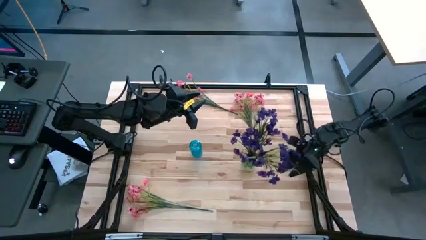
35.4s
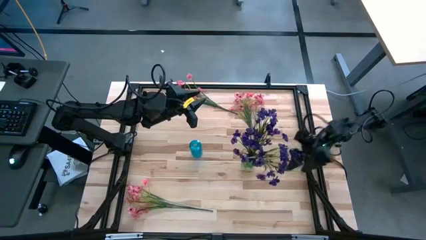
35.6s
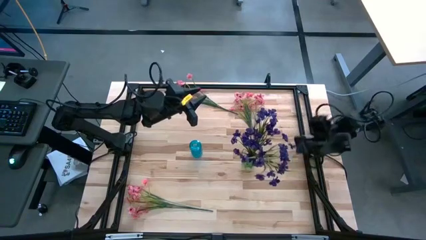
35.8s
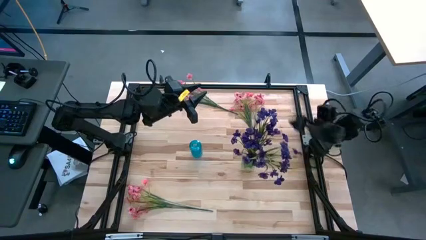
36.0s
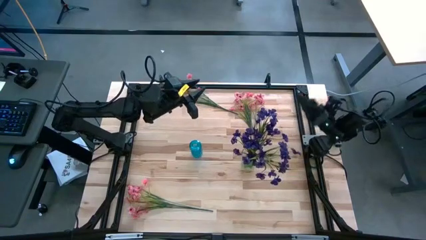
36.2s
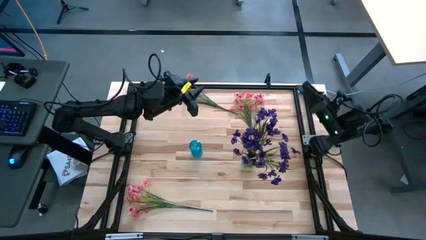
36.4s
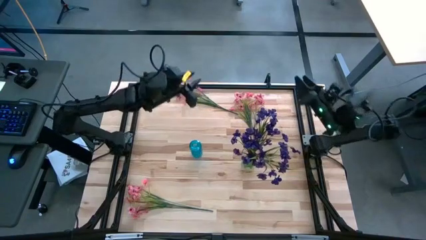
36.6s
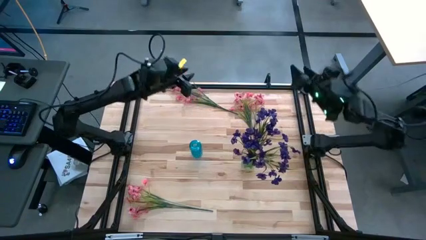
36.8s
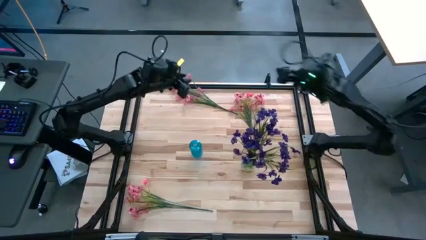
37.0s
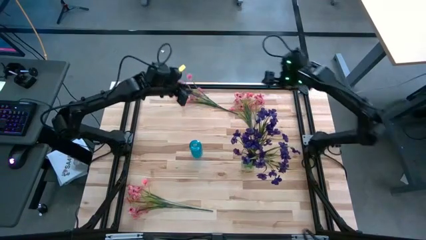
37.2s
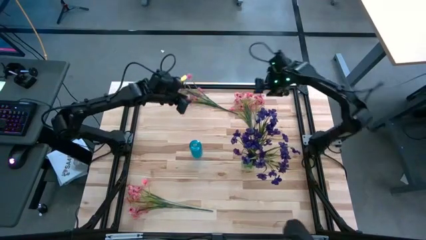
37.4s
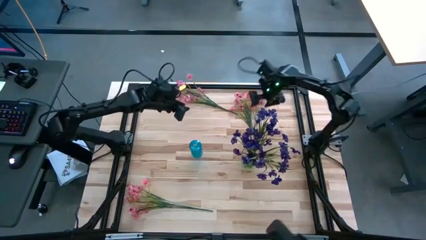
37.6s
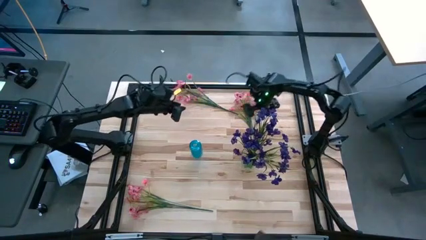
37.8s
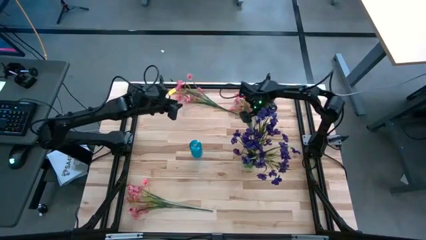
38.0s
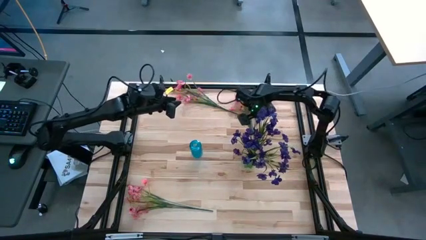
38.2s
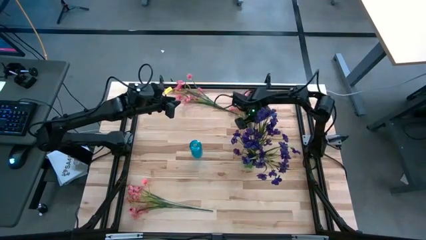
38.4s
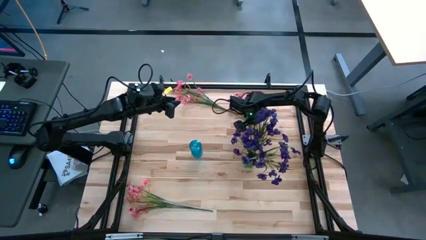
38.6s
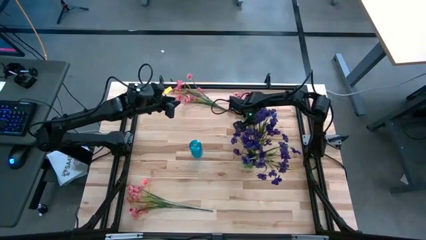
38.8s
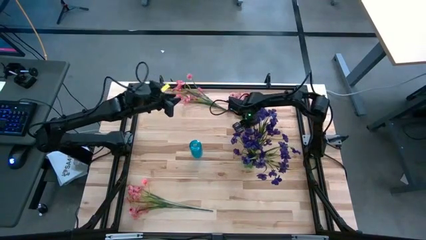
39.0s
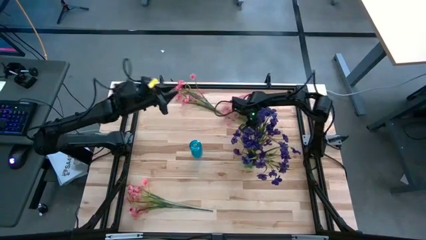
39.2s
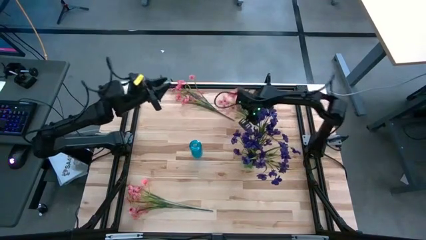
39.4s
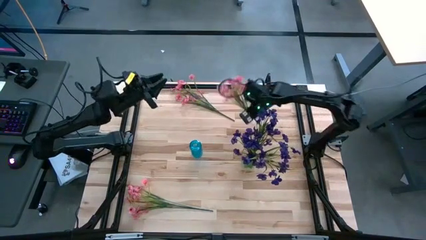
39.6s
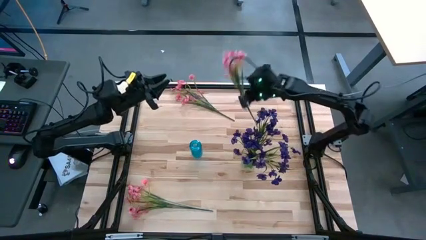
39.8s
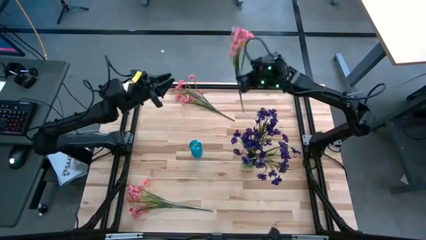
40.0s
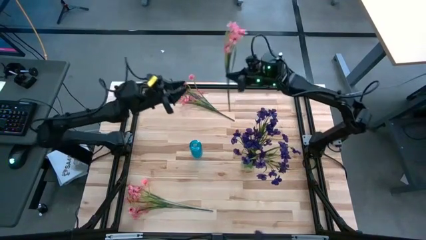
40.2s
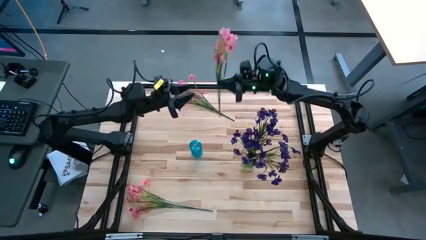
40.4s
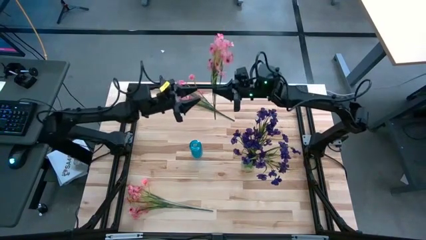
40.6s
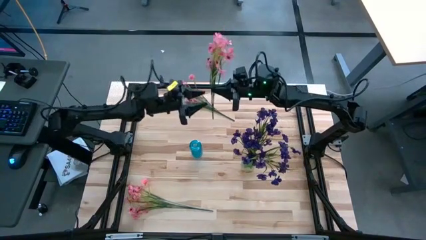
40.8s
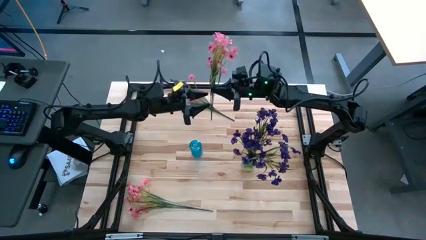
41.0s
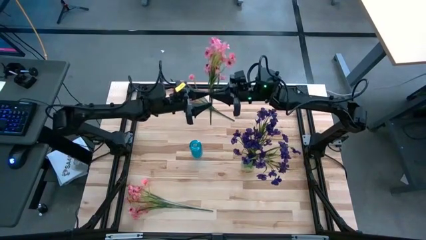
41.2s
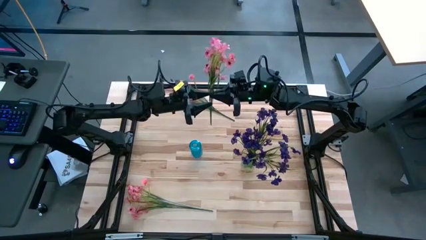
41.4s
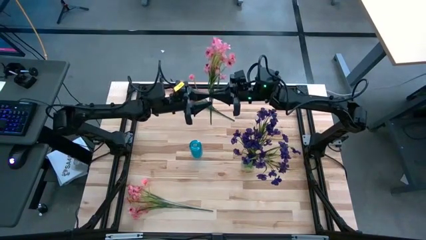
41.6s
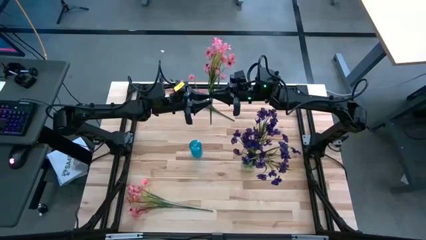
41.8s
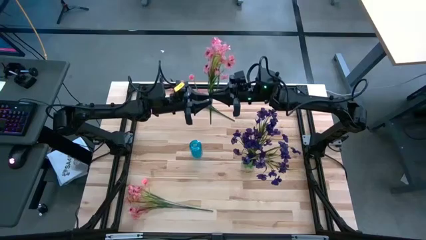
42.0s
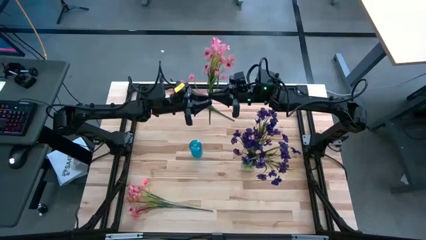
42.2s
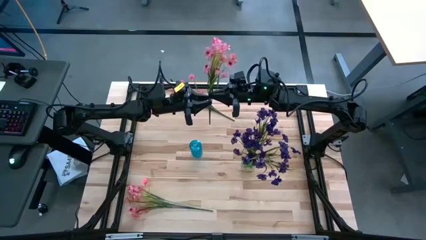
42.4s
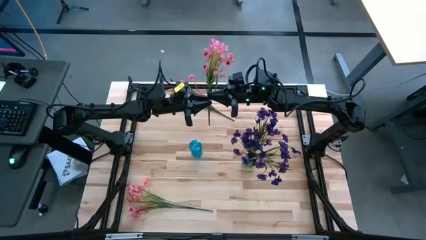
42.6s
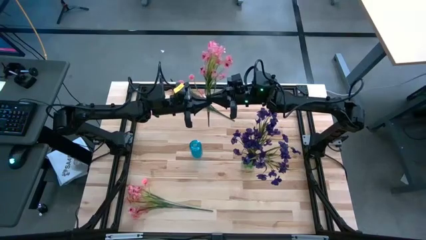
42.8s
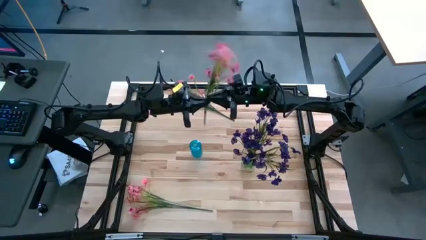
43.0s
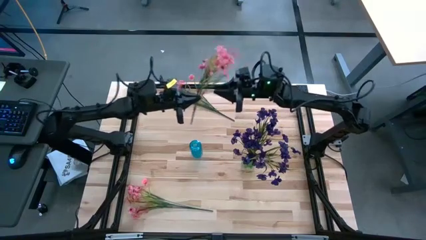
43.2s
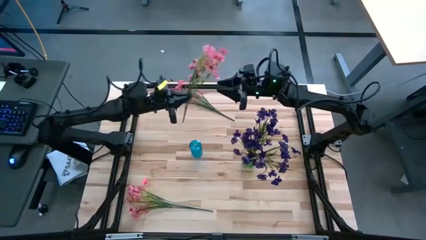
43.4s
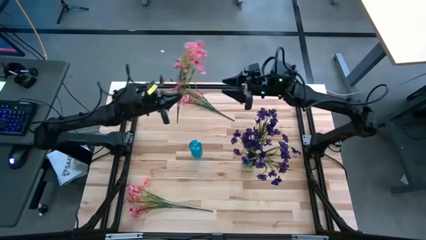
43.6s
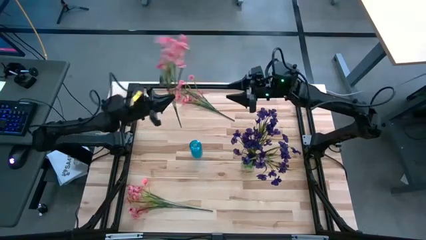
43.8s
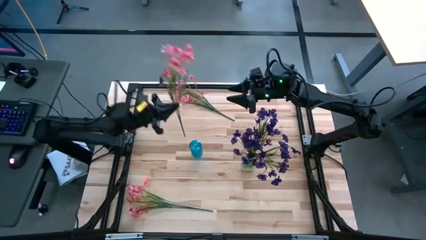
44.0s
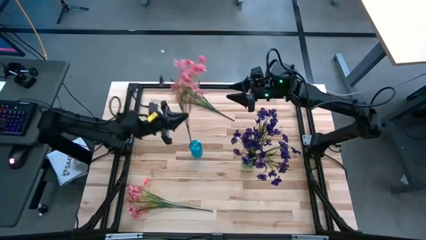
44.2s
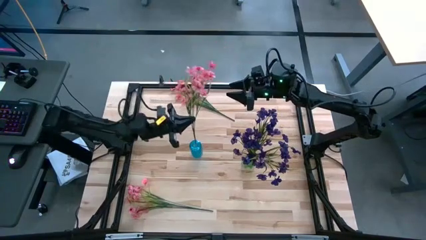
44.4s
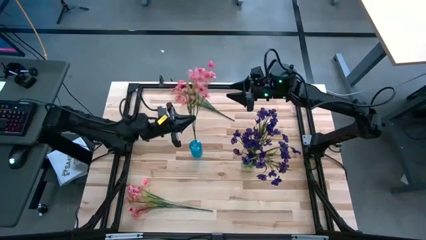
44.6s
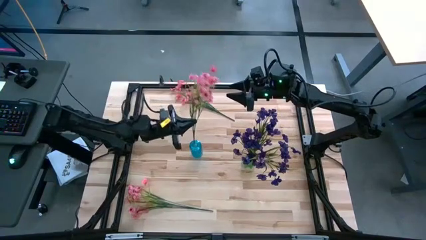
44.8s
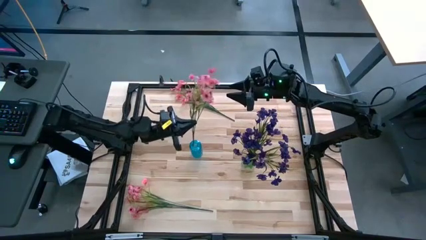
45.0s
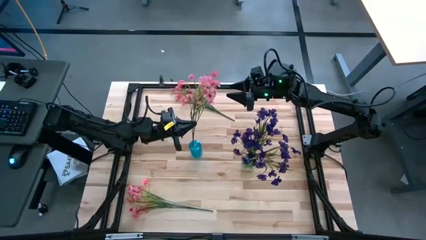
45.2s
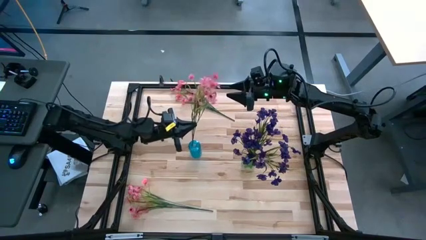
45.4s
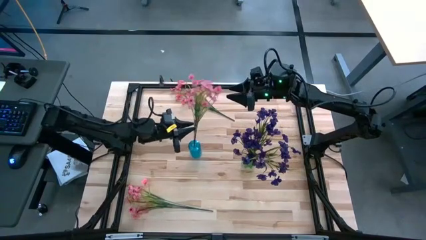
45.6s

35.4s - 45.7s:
Task: Sort flowers into vase by color
Put the top right pink flowers into the blue vase

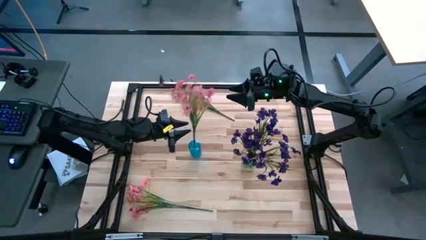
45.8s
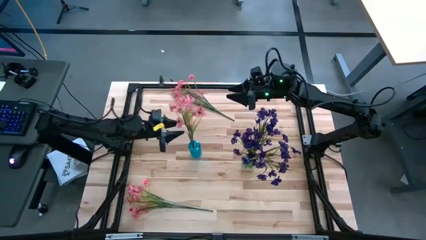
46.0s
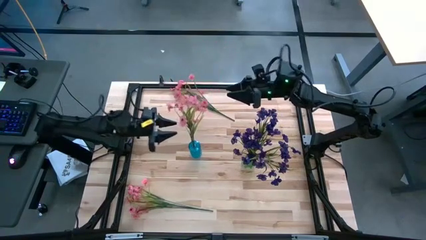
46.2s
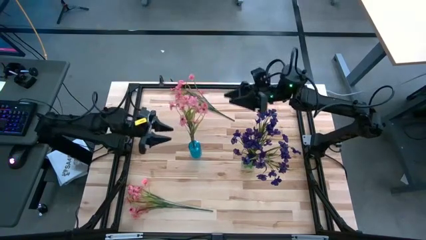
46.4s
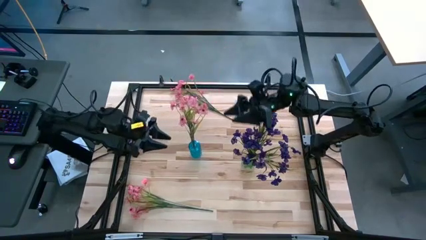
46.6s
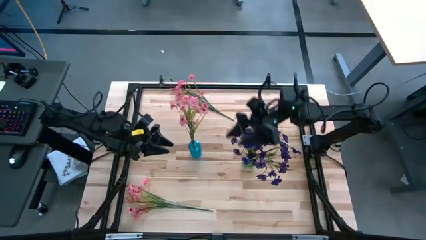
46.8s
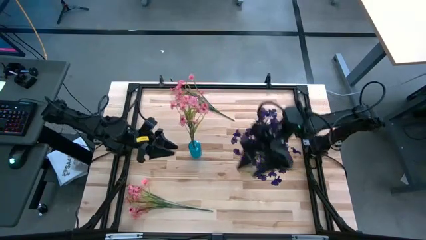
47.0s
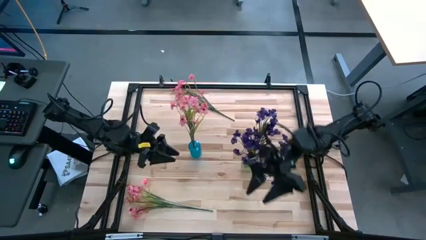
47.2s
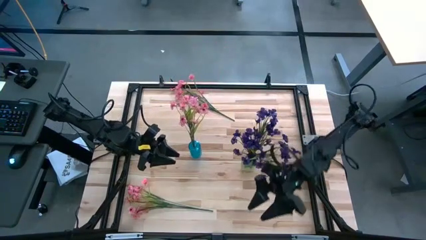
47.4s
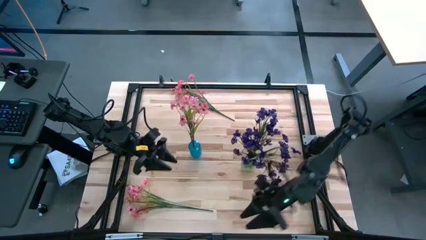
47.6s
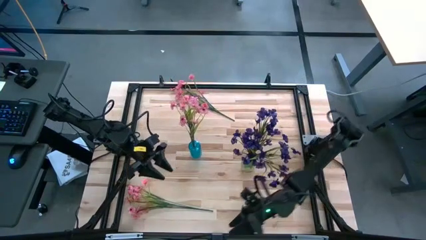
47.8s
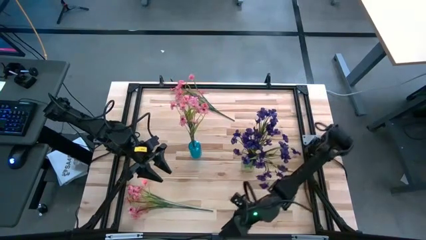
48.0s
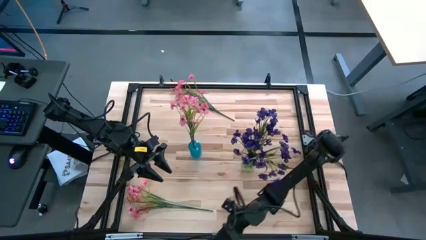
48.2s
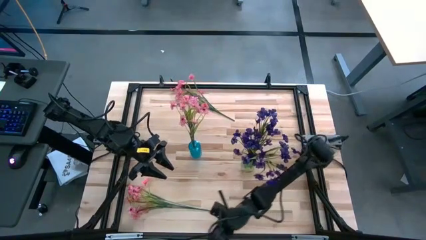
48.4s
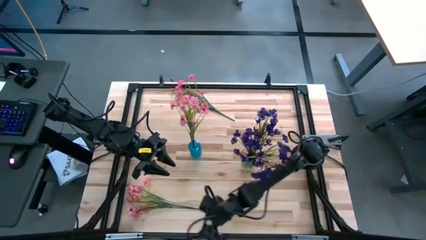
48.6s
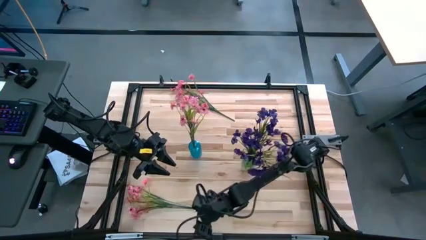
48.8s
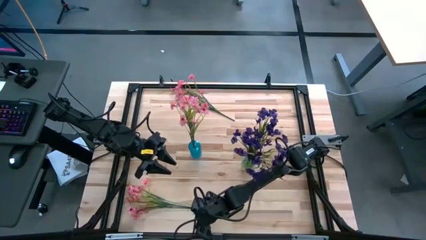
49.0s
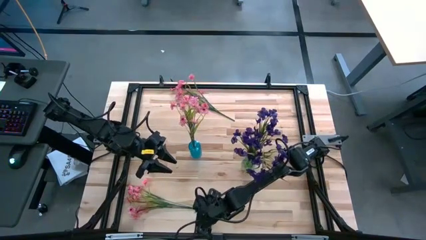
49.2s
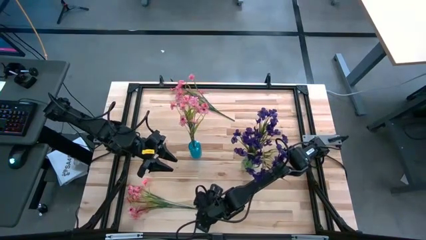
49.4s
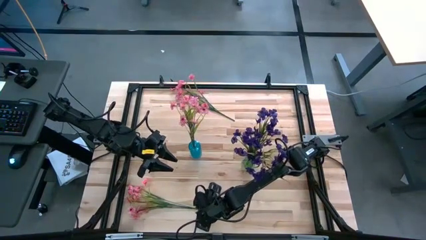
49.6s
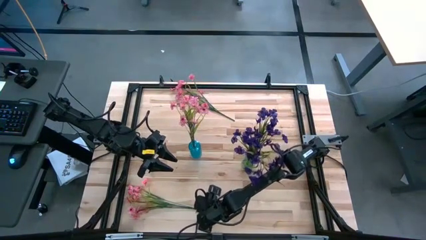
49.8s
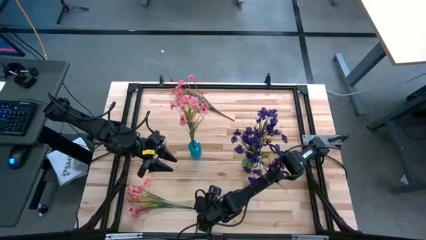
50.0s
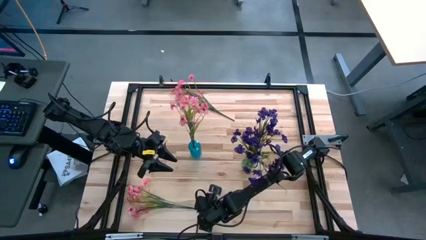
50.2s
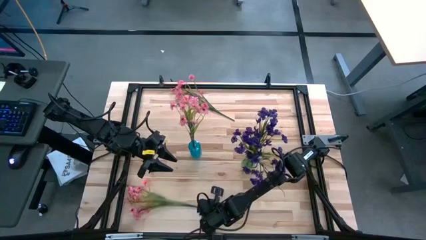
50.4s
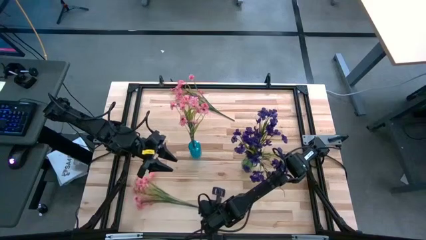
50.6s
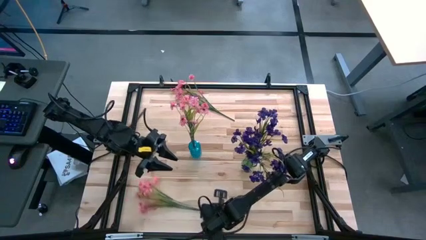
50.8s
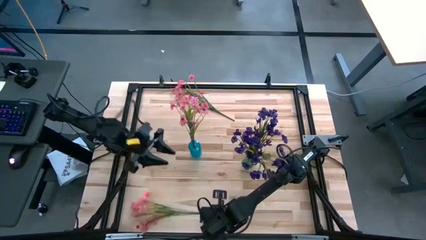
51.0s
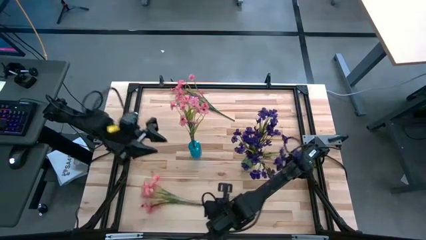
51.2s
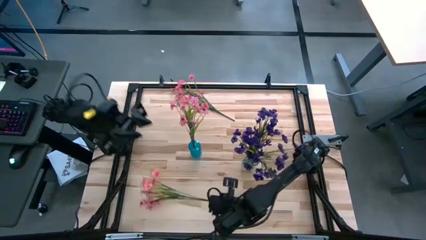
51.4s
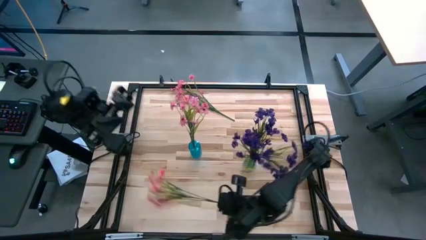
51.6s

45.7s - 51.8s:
Put the bottom pink flowers into the blue vase

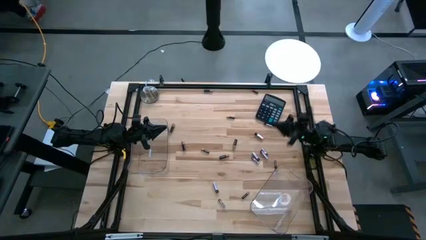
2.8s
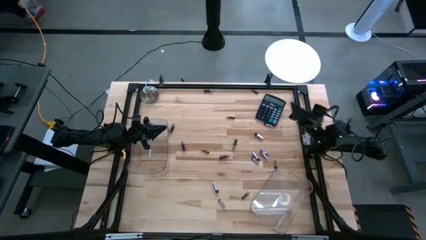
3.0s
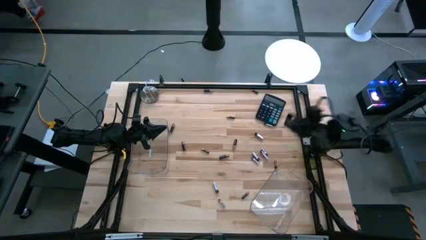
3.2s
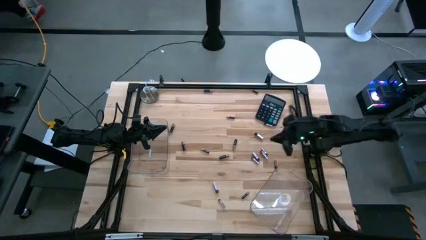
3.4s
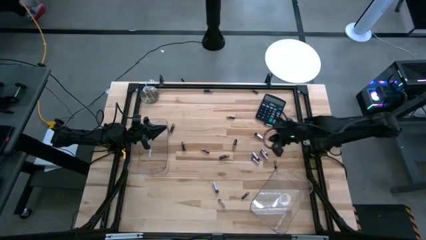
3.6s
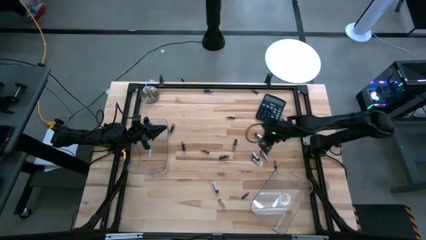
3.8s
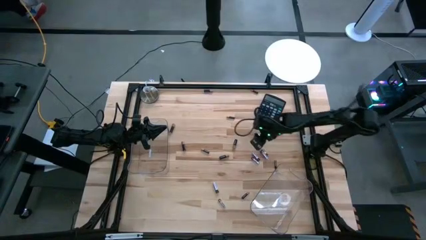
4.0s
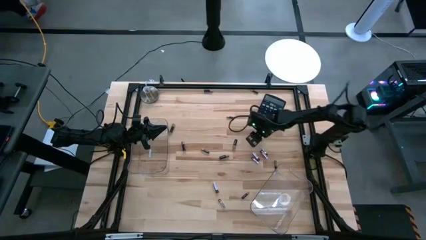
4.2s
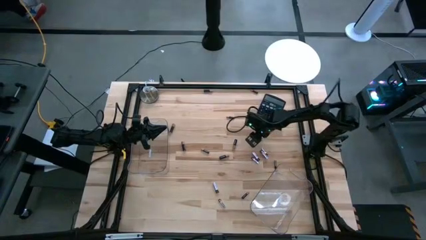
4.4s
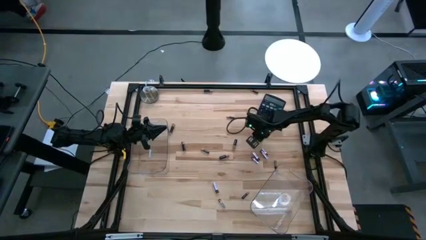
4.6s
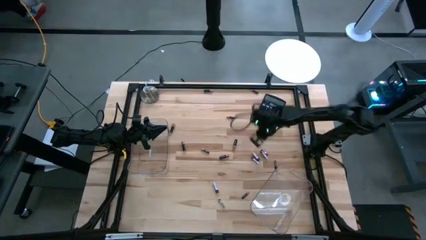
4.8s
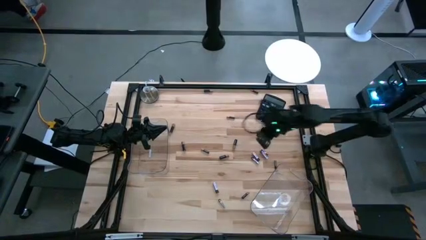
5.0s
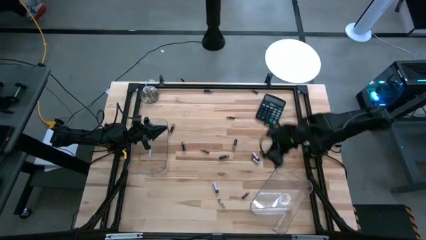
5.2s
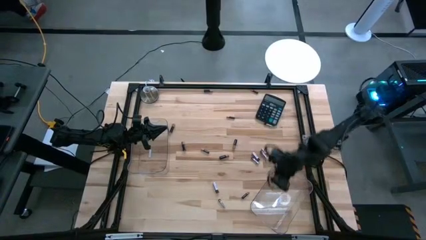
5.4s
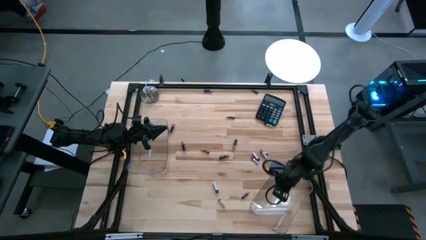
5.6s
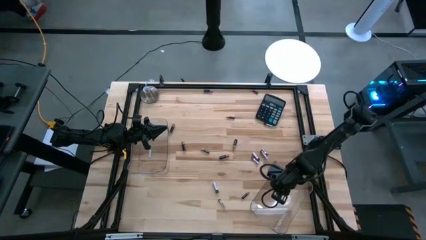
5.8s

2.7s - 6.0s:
Task: Sort batteries
Put the silver battery into the right transparent bin
